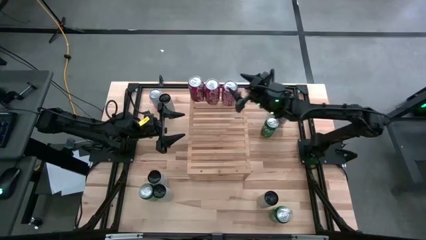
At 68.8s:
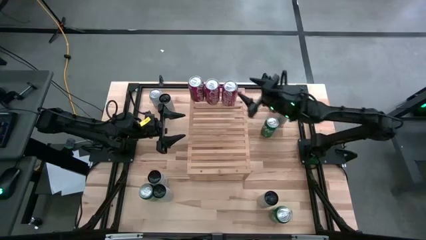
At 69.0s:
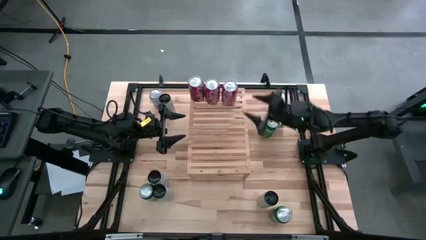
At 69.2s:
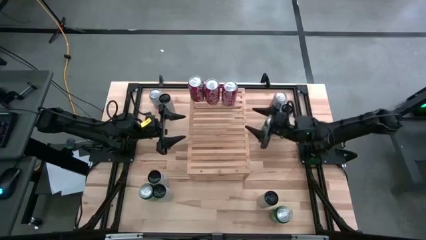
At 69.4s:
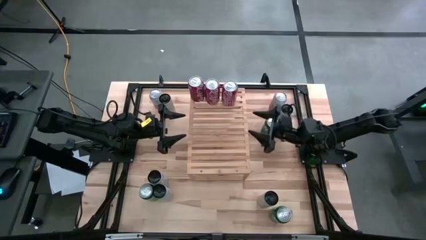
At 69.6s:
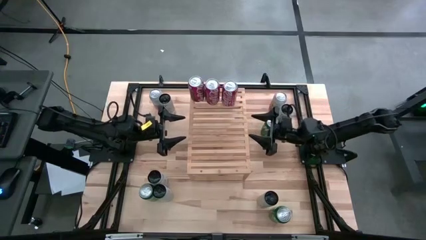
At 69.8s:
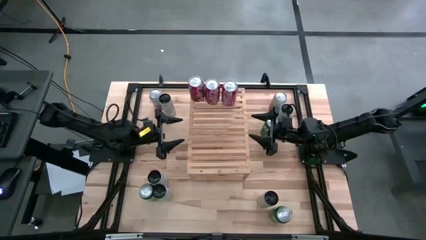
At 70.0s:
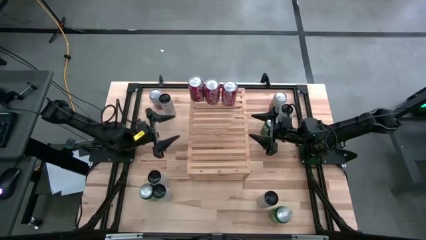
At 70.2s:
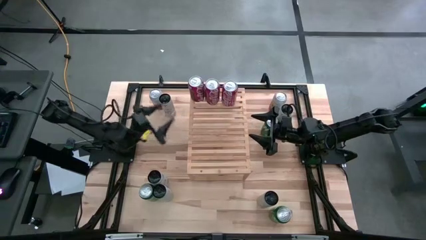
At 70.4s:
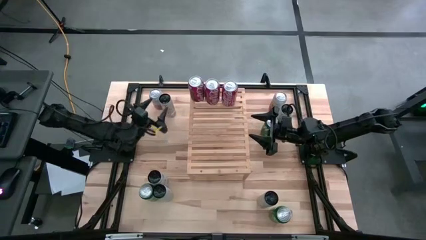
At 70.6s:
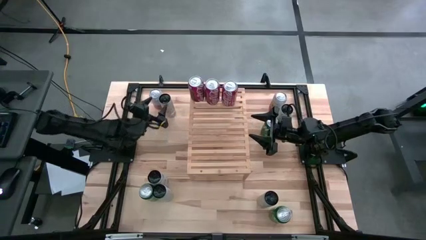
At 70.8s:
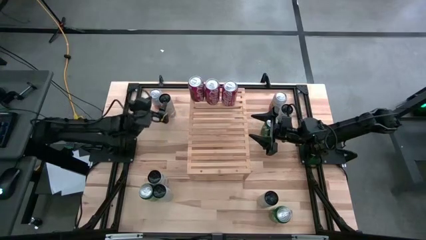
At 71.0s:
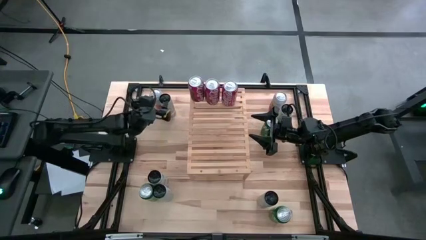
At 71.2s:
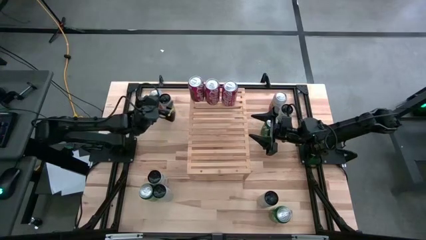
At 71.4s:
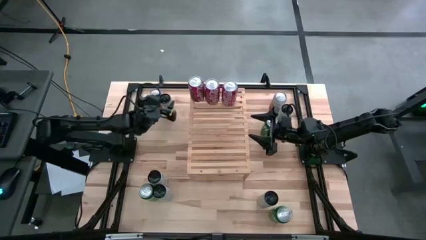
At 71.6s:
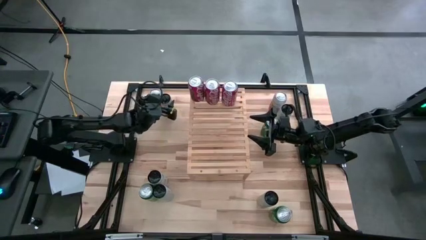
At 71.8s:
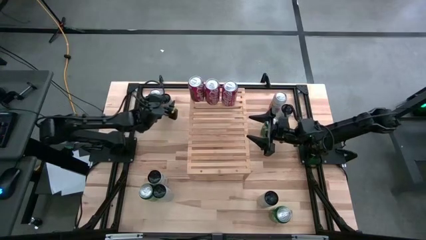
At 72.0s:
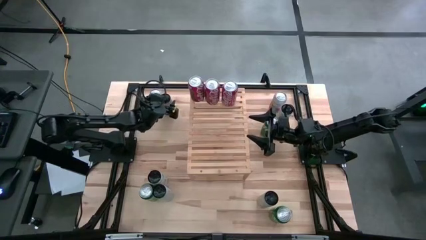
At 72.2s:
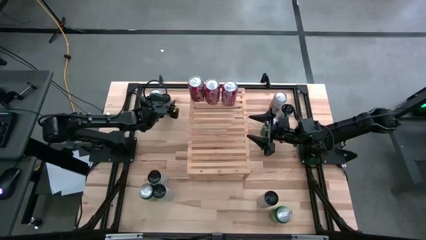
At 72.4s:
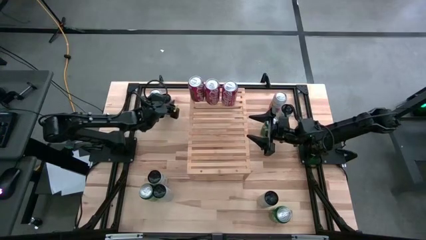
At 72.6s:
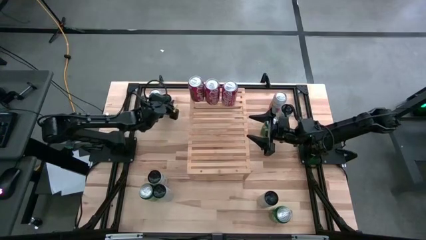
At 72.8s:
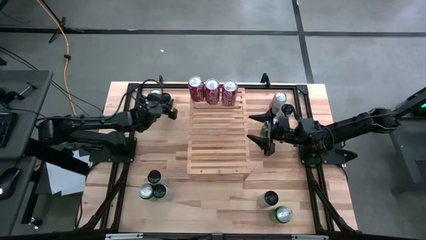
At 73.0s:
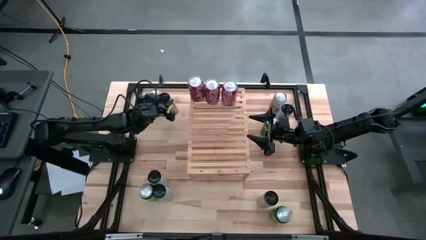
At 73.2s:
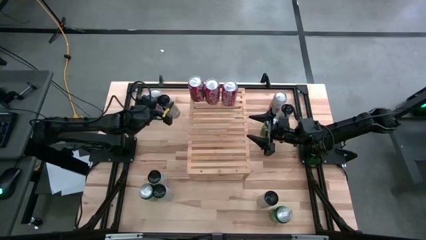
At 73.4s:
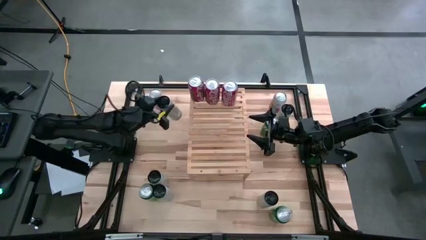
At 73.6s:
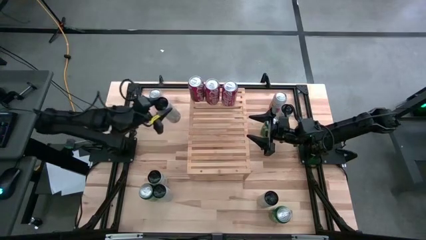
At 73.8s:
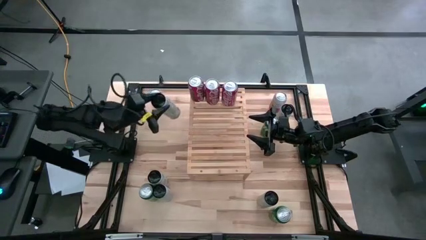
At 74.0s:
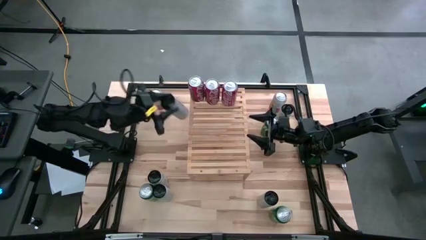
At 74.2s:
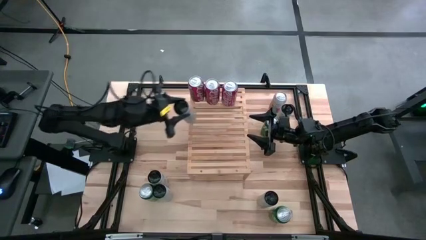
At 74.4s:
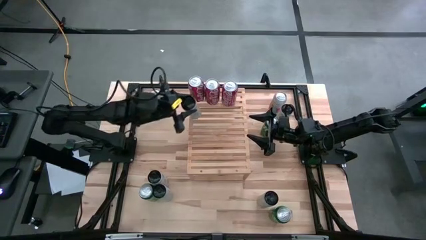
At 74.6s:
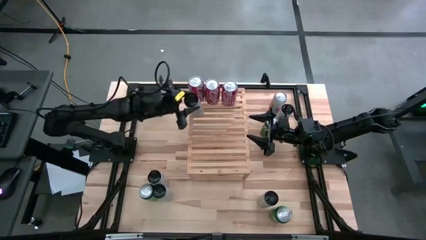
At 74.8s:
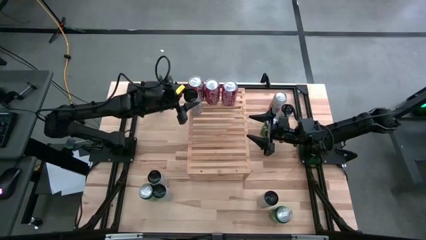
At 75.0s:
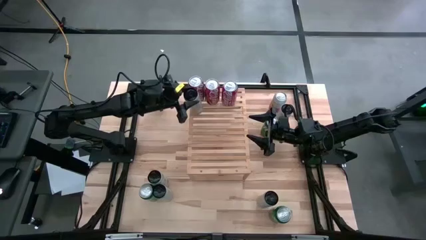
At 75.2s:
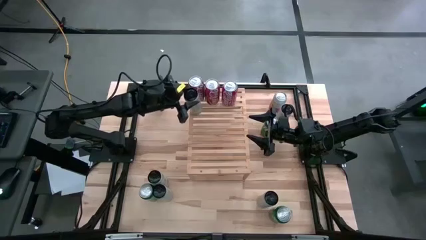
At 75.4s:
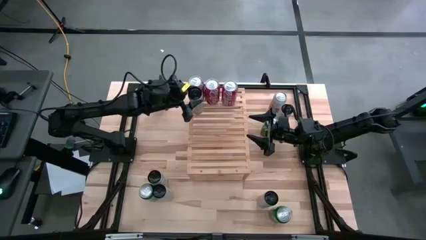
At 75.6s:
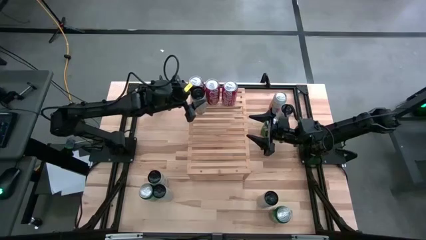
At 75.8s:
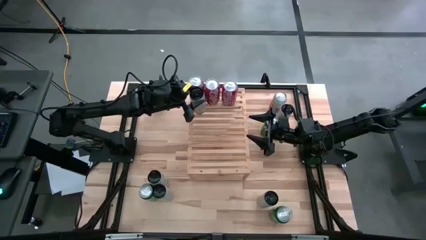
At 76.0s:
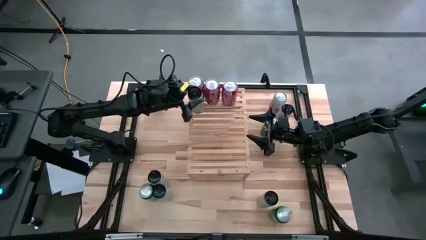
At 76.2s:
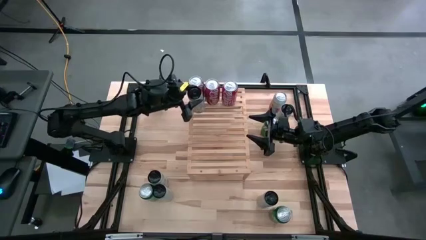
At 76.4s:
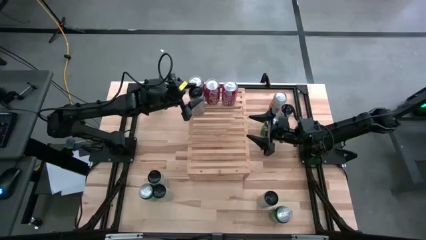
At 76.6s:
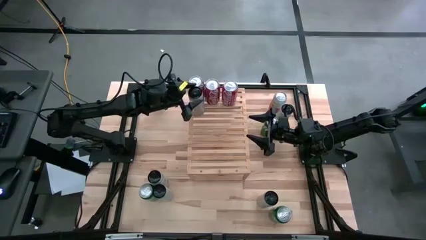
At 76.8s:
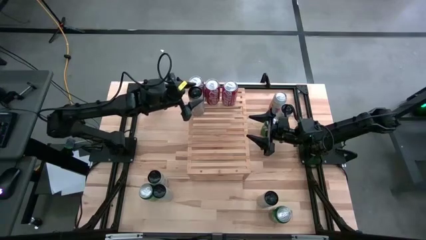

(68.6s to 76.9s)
Task: Place canned beverage on shelf
Put the top left tropical celsius soda can on the shelf

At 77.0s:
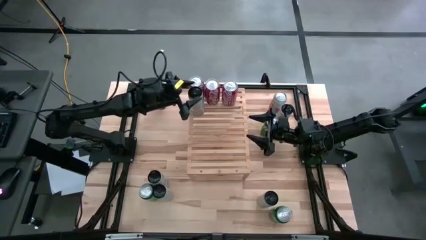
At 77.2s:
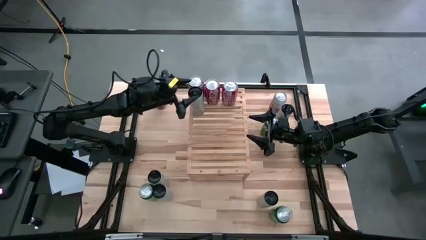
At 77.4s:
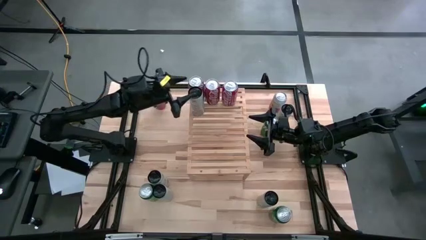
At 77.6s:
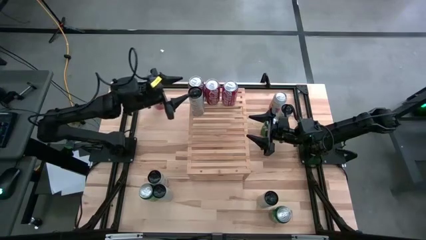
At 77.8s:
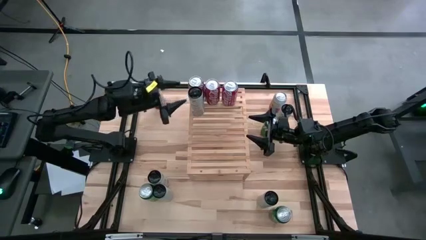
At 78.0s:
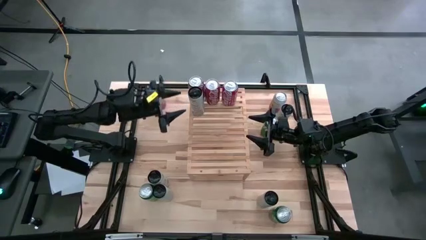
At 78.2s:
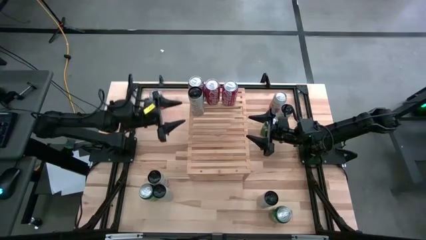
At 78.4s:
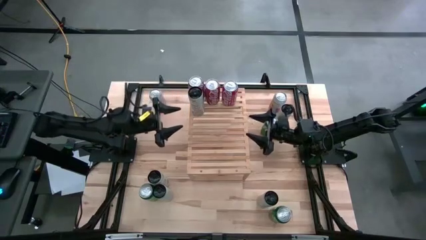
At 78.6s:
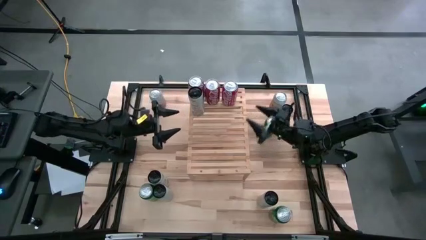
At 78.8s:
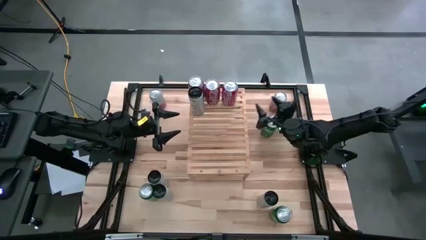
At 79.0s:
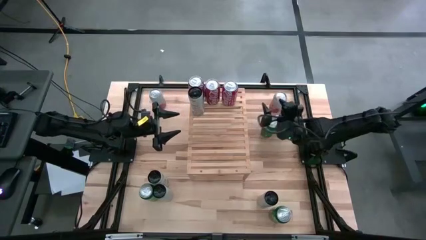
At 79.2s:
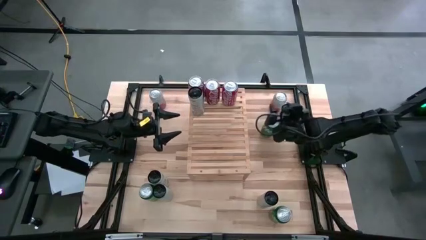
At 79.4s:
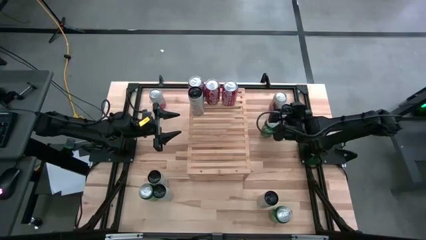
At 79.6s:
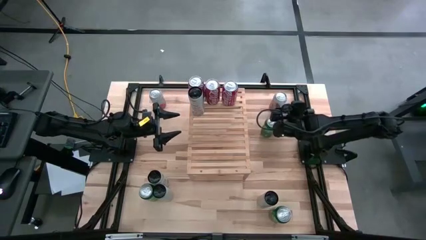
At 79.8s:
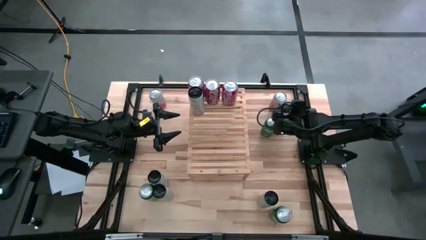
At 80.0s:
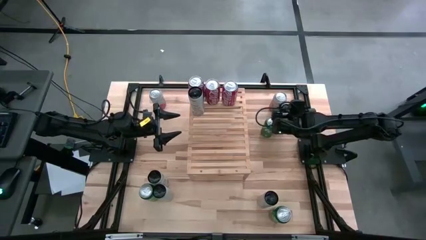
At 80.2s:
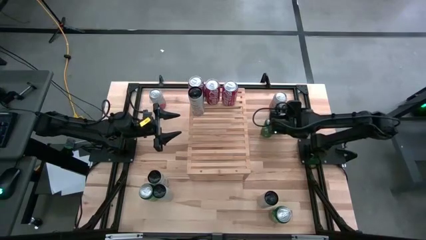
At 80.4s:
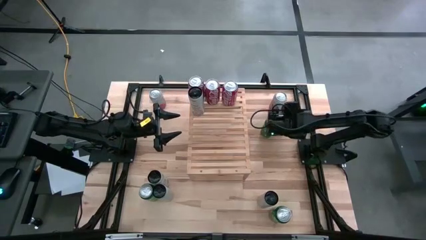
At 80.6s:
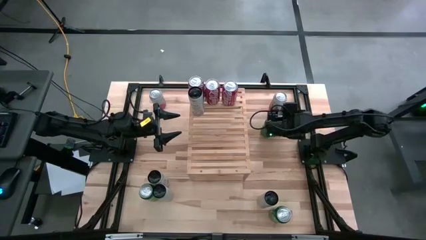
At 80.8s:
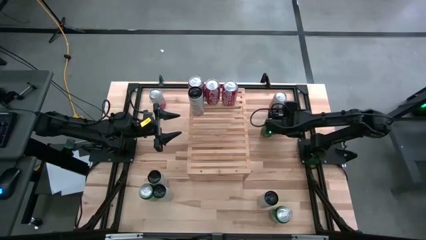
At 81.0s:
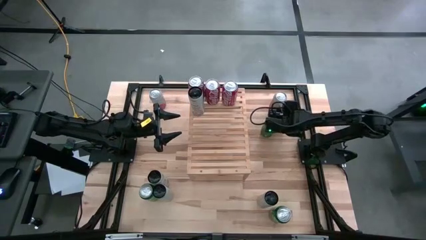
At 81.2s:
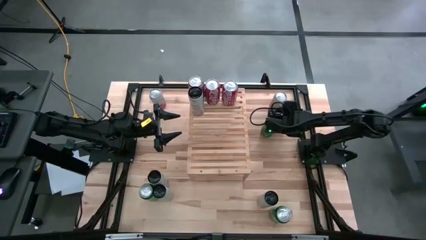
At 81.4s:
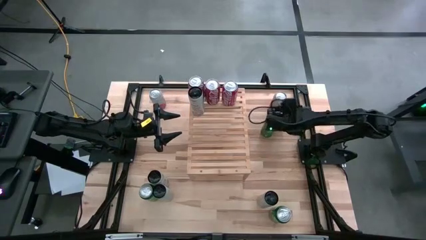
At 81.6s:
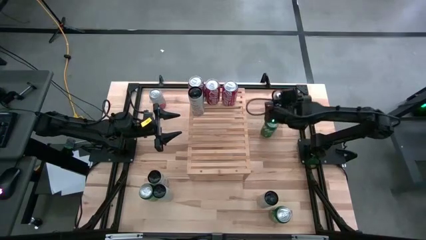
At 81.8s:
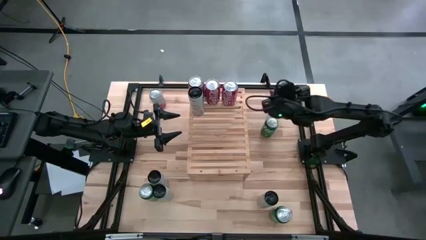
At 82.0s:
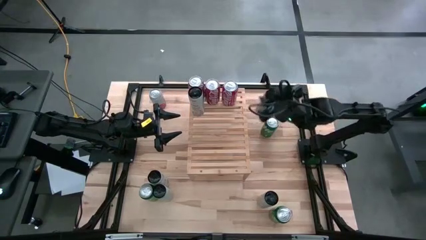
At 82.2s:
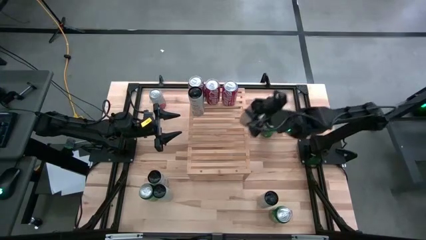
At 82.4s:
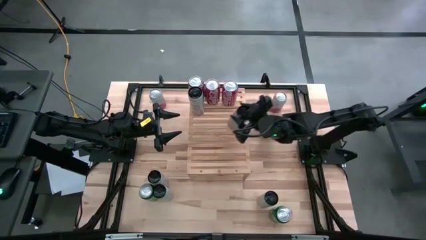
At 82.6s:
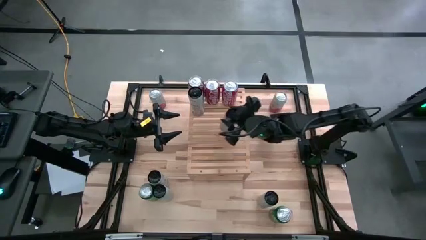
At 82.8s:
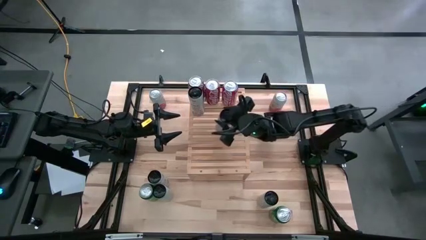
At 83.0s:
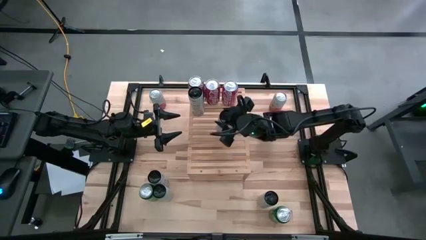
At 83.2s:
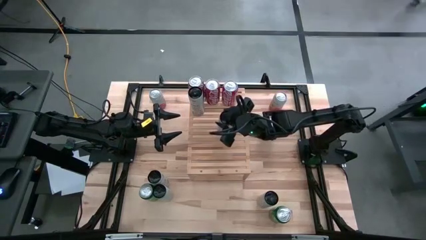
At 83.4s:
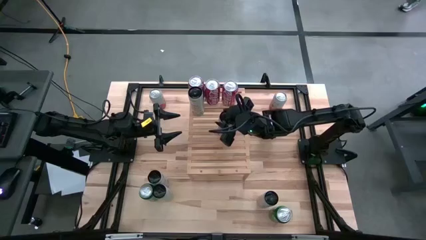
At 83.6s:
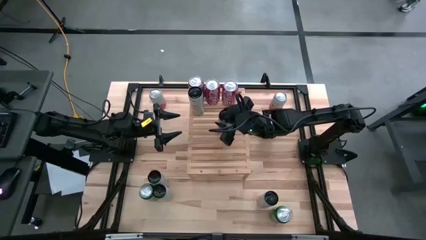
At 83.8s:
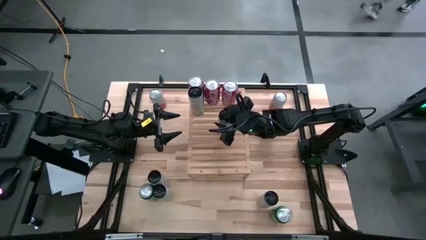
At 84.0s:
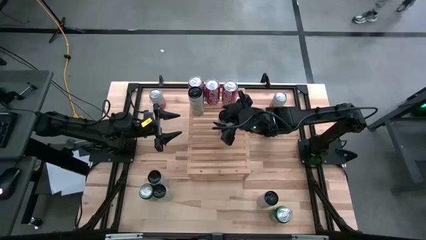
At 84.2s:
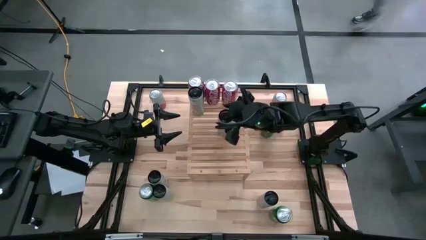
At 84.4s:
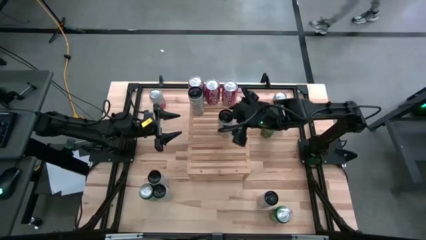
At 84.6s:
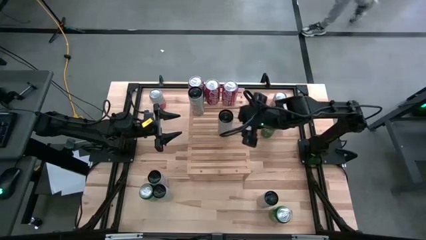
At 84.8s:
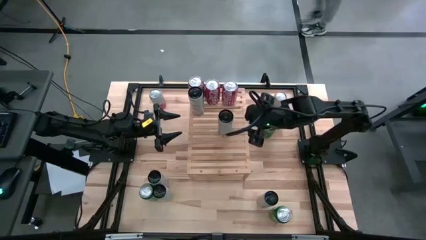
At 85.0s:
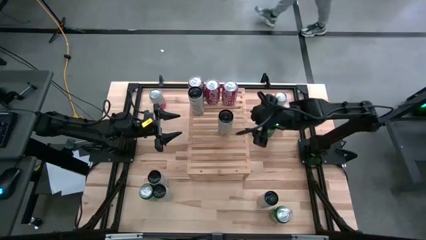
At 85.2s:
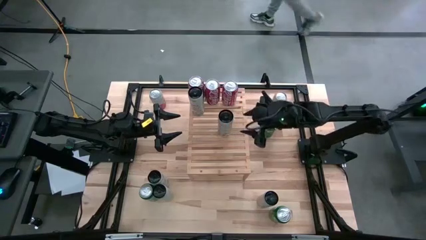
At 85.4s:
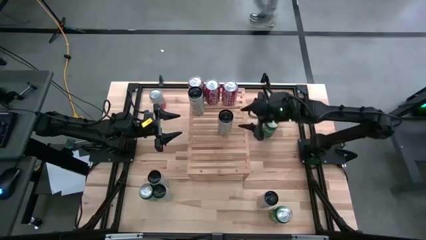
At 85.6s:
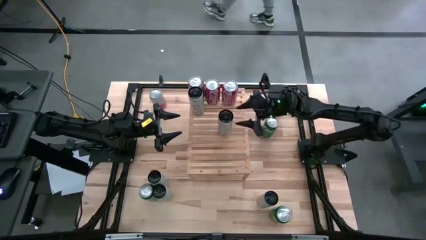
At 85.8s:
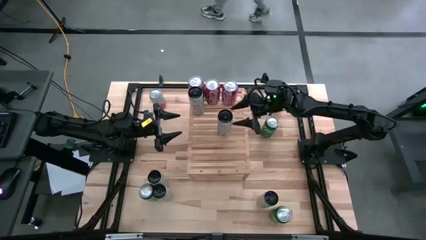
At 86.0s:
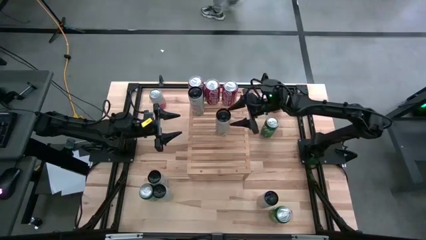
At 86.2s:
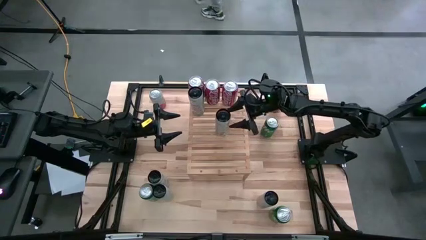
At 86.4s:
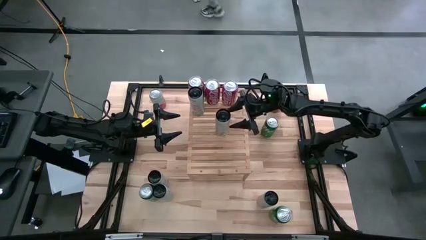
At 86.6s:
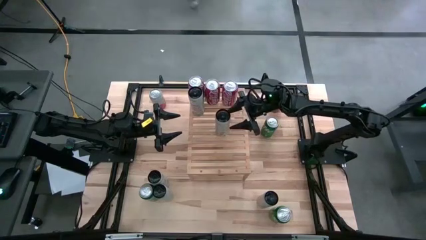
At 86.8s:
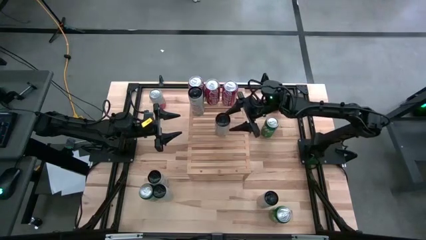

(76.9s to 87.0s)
Align the top right tropical celsius soda can with the other tropical celsius soda can on the shelf
